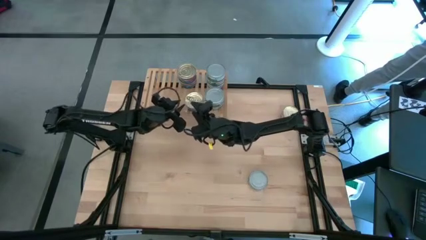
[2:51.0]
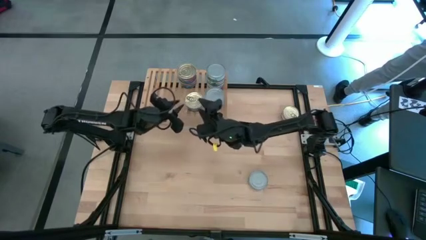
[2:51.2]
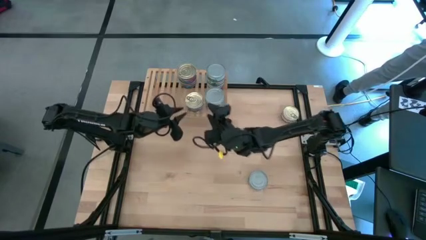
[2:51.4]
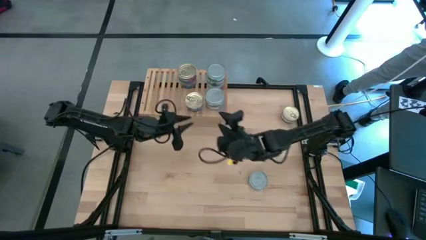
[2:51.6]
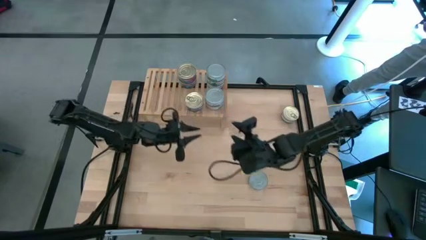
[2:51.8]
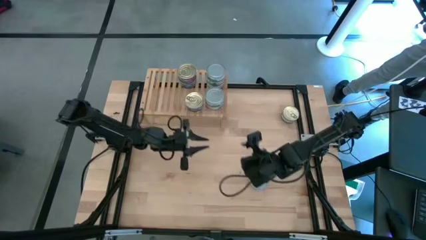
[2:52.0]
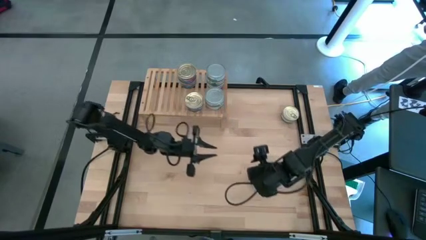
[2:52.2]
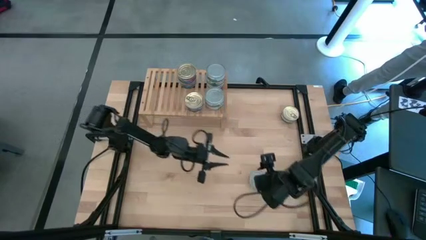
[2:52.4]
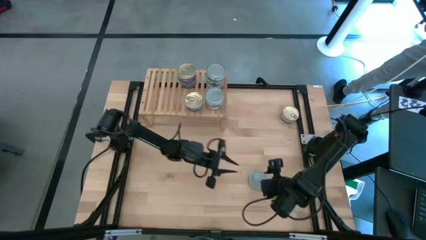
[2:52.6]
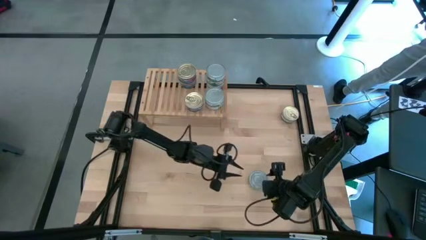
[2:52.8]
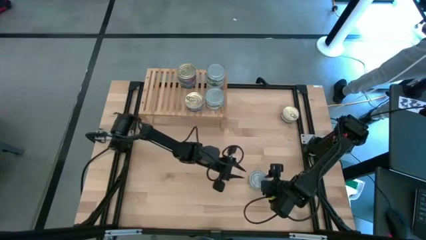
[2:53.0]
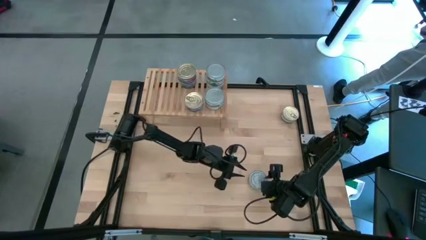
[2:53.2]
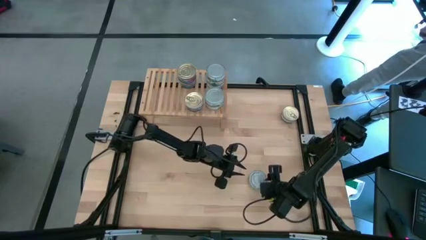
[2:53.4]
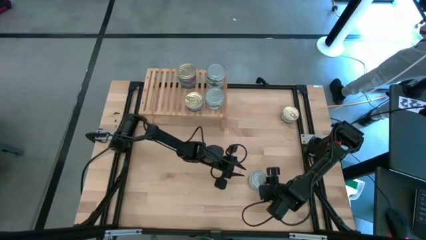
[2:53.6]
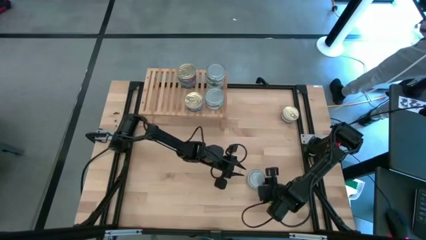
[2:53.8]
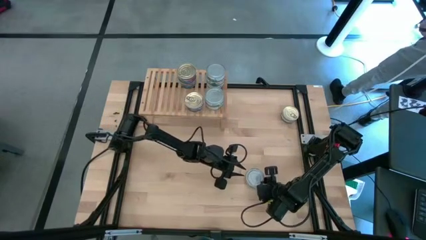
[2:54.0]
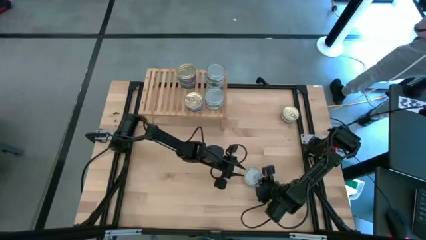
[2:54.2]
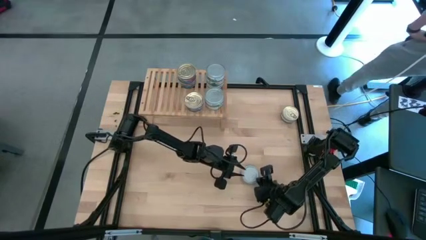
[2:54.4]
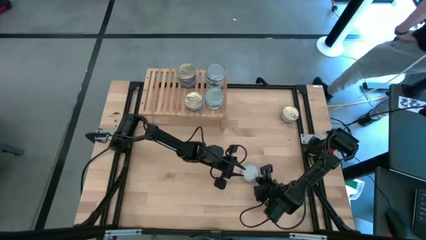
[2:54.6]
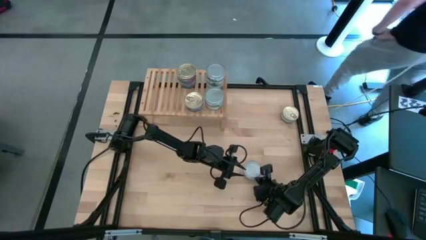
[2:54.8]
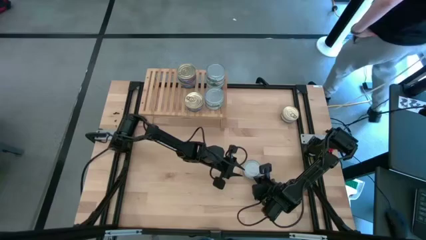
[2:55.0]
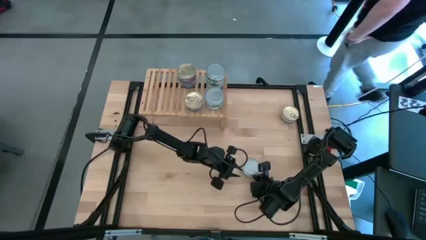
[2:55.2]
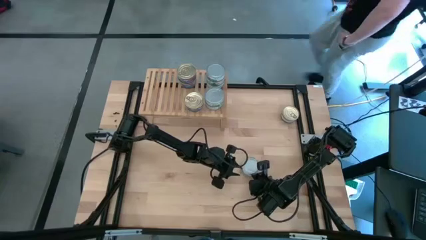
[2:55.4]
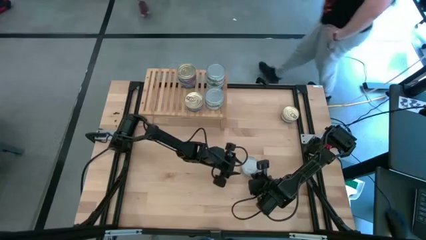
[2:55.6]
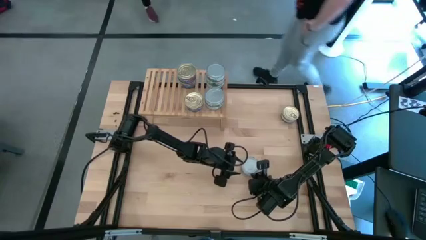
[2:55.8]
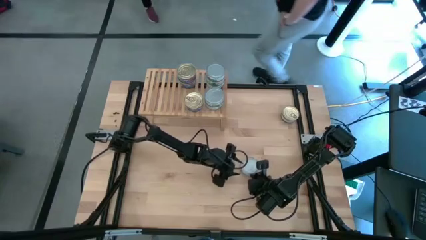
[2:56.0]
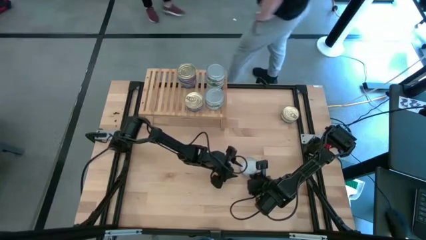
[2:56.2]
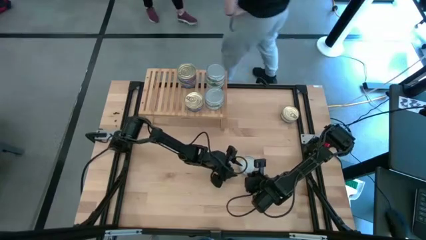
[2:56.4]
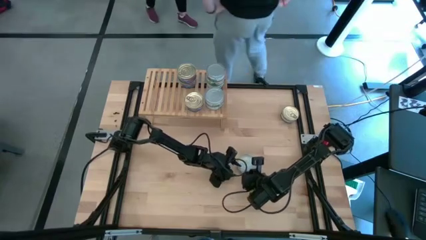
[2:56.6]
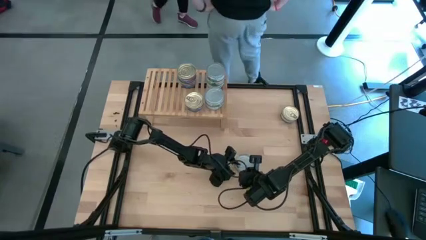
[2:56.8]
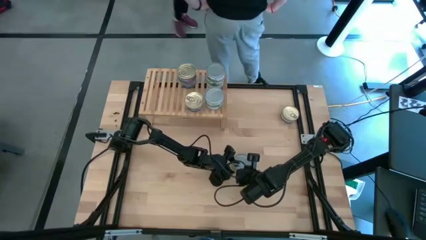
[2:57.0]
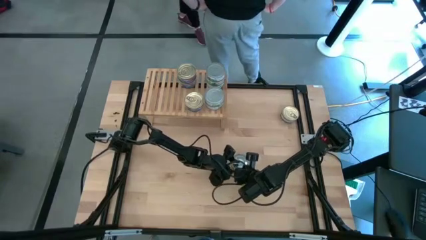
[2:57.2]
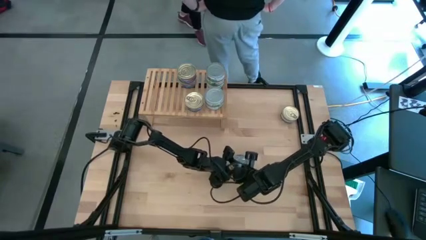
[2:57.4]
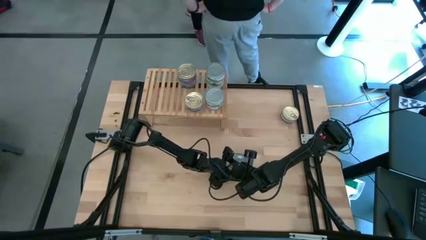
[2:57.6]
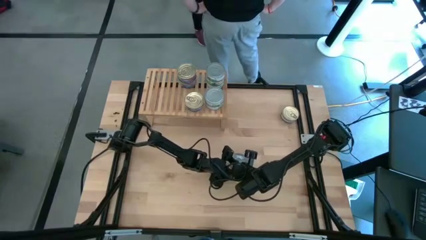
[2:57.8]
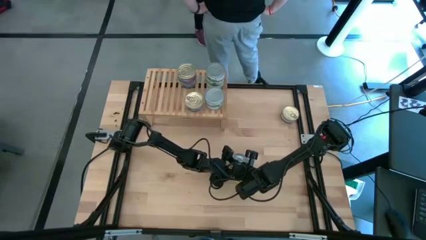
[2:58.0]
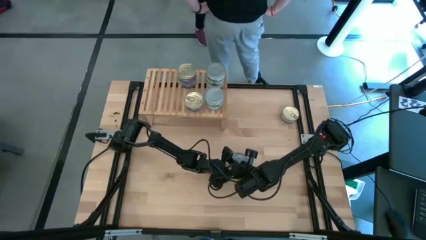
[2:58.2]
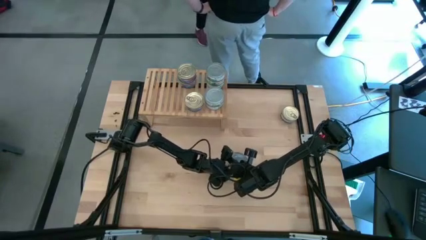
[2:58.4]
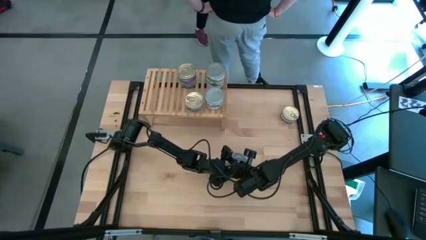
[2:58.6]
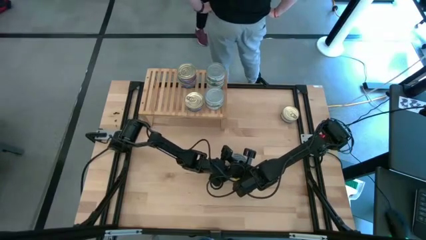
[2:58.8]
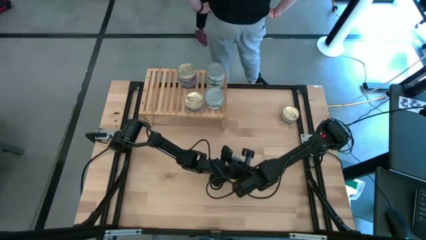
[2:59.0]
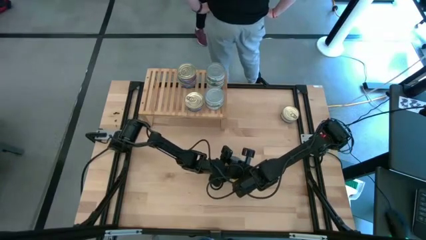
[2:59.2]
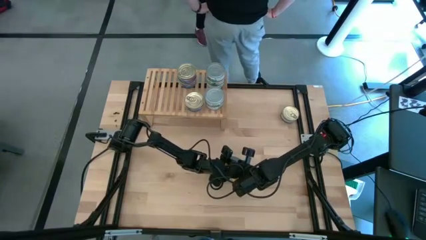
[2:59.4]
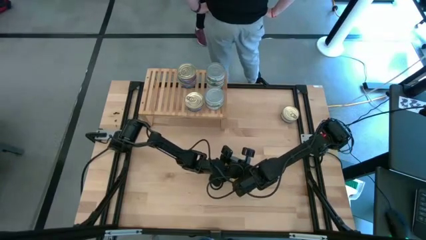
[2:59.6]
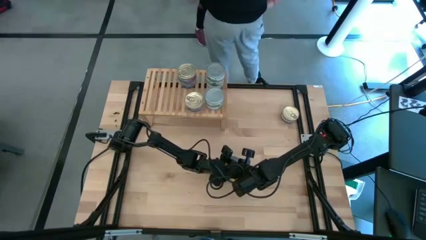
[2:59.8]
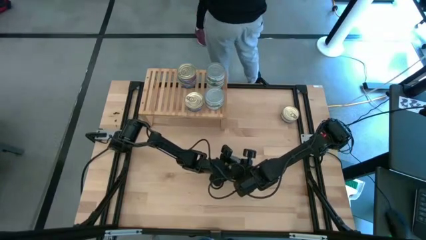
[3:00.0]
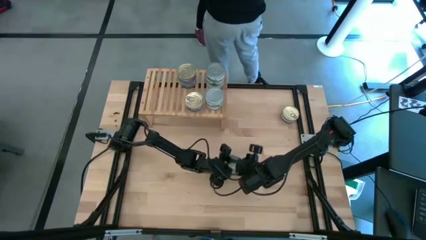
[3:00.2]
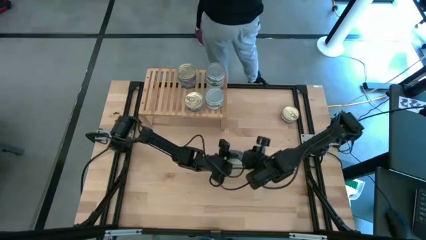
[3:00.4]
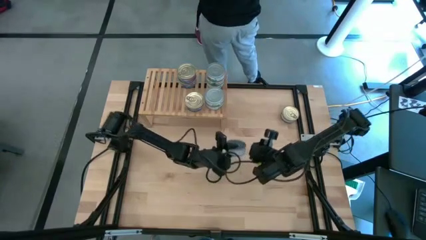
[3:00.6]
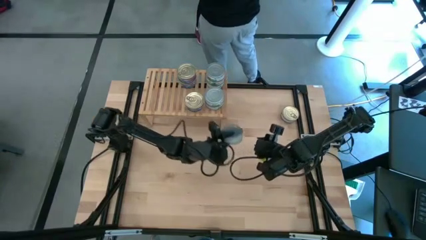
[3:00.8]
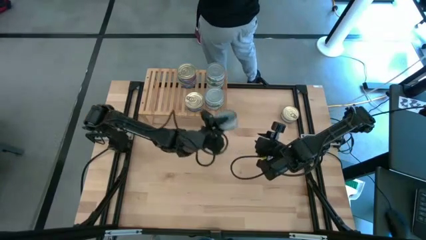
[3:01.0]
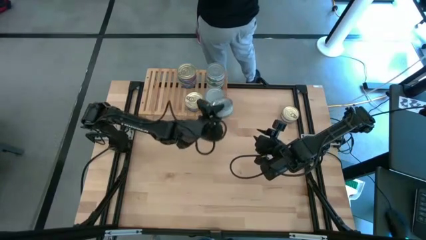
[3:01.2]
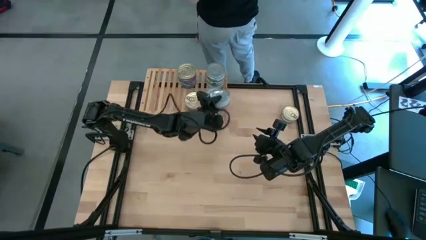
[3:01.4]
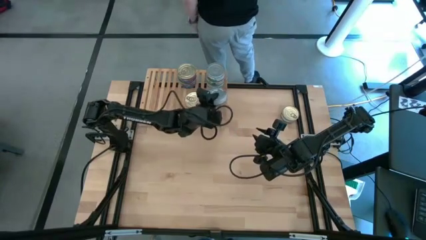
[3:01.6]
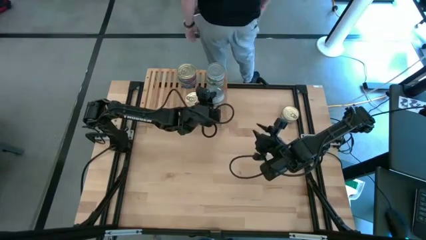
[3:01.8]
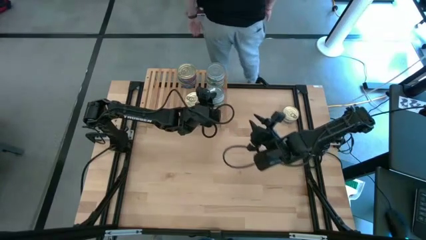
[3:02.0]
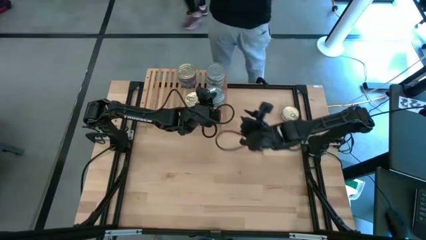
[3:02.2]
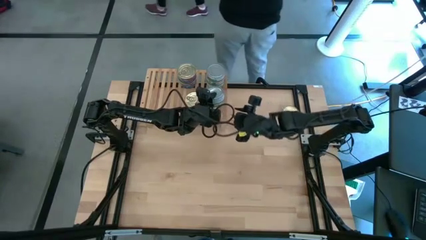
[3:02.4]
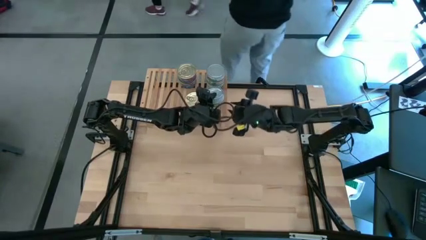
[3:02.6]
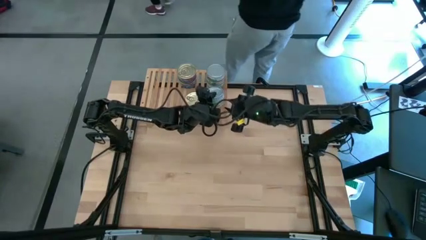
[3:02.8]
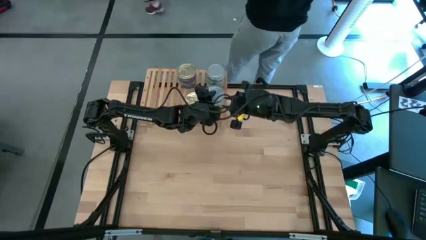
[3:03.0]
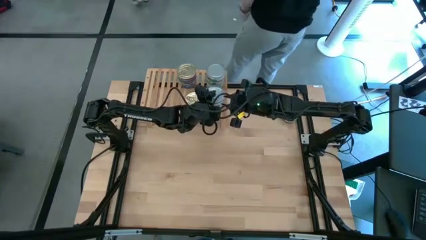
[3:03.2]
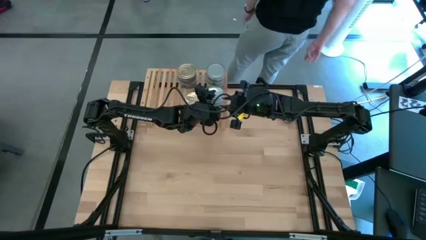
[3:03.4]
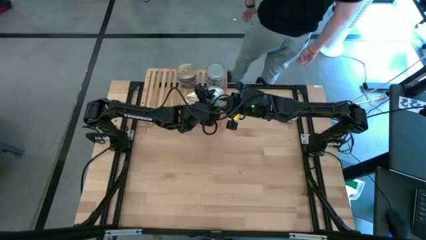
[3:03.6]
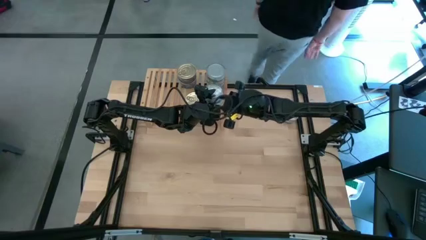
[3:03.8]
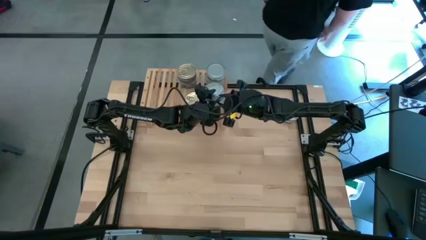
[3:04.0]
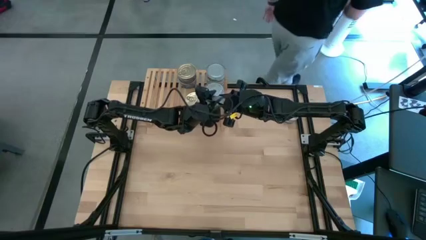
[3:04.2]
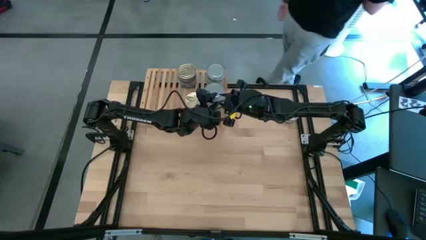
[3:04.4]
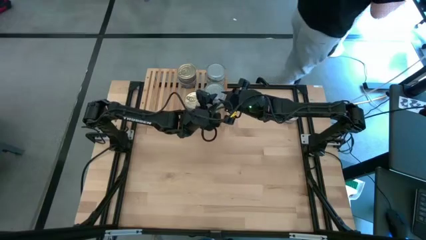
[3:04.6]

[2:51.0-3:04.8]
Task: Stack canned seafood by type on shelf
Stack the green tuna can on top of the bottom stacked green tuna cans on the shelf

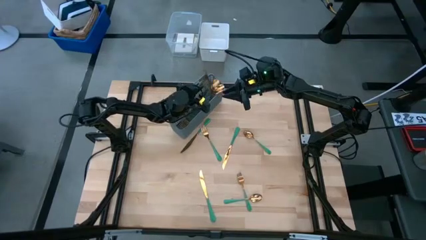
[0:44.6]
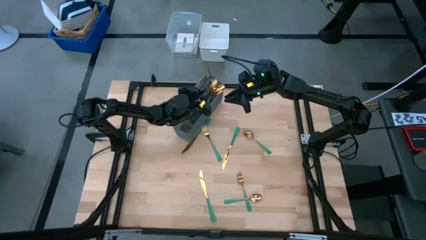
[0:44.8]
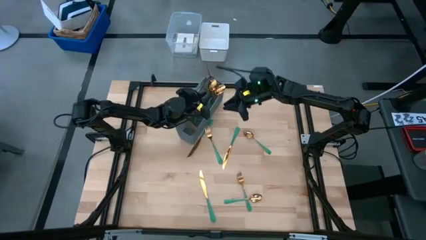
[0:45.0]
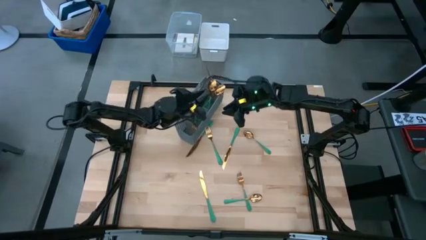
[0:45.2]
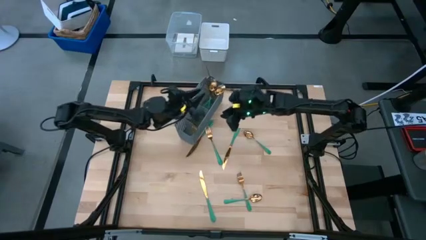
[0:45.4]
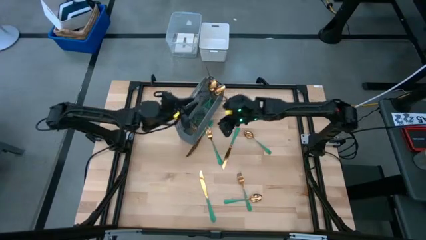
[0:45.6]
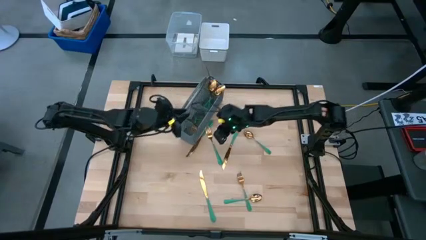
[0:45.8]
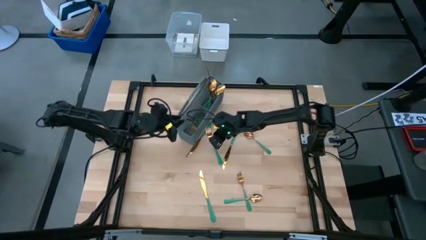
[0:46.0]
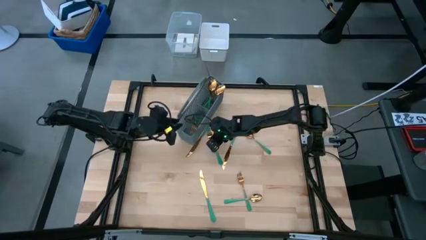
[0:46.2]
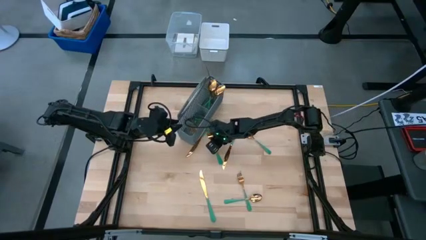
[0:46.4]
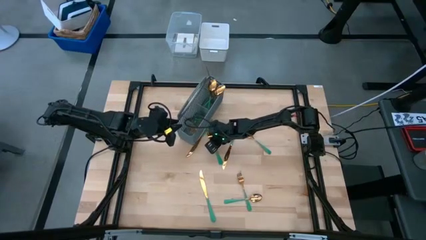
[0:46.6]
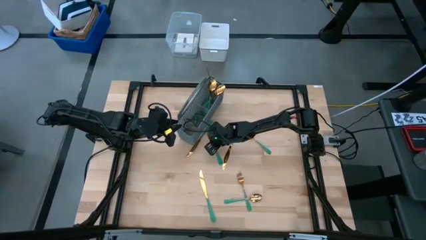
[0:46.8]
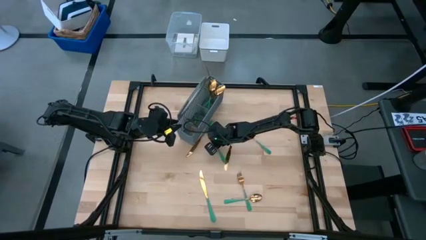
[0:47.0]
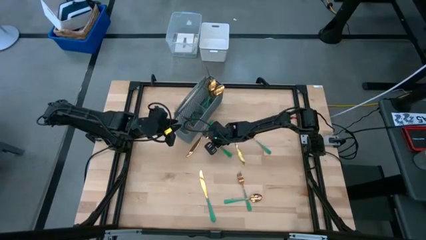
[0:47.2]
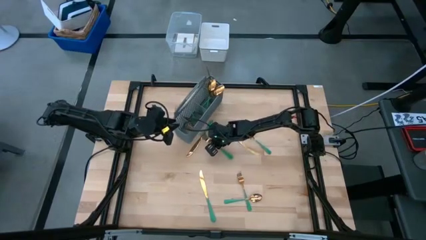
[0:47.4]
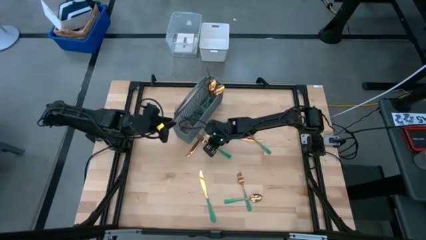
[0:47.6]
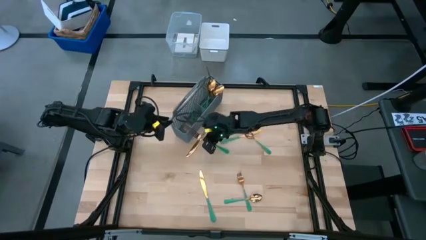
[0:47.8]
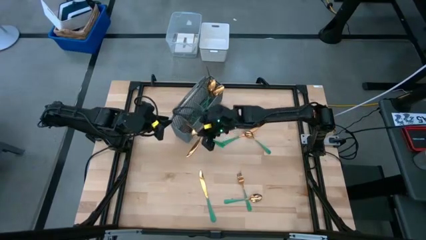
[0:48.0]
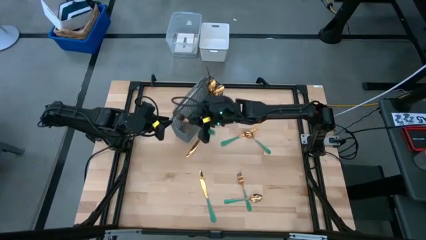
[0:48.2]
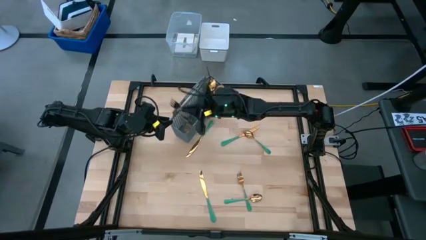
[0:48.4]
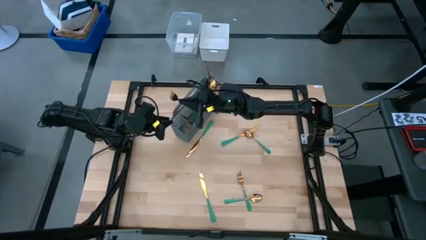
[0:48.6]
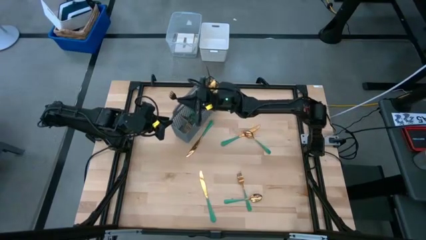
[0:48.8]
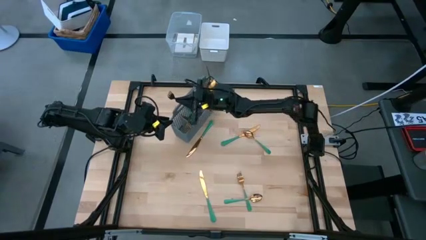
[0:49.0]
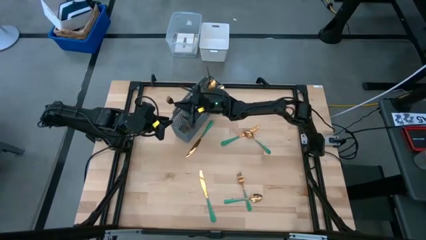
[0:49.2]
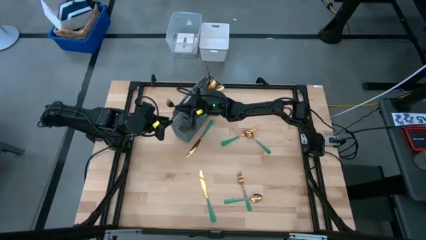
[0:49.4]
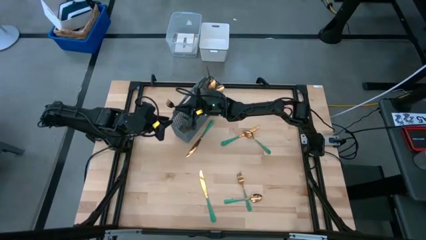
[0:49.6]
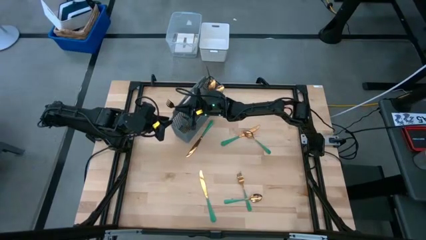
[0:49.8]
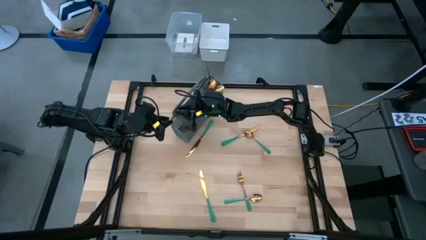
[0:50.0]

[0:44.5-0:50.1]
Task: Sort silverware
Put the top green-gold fork into the silverware basket
